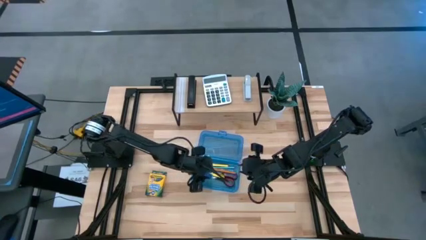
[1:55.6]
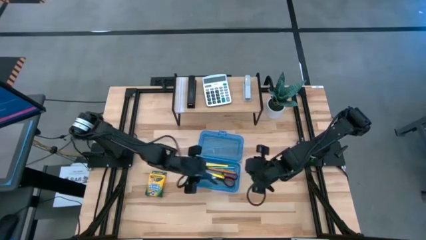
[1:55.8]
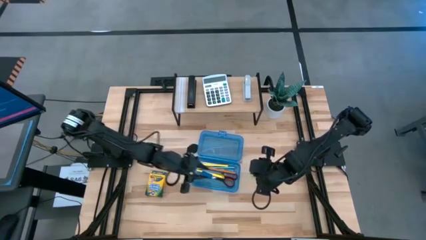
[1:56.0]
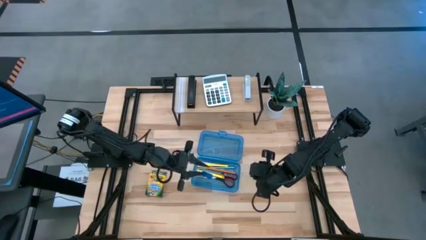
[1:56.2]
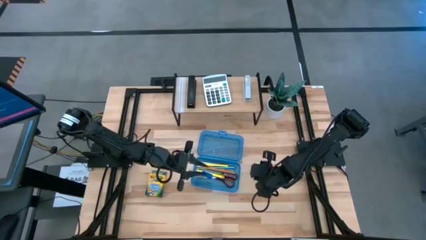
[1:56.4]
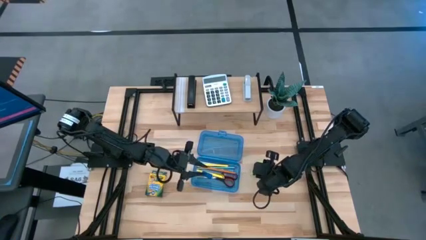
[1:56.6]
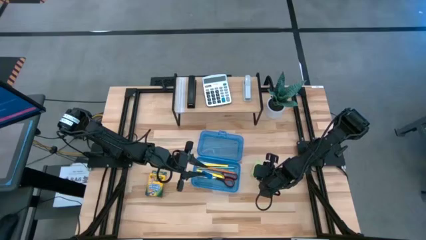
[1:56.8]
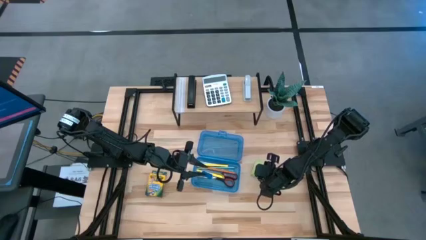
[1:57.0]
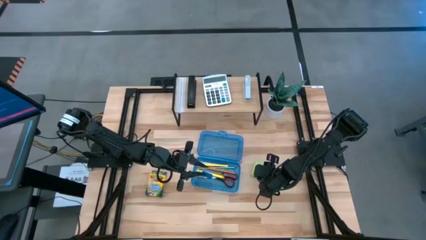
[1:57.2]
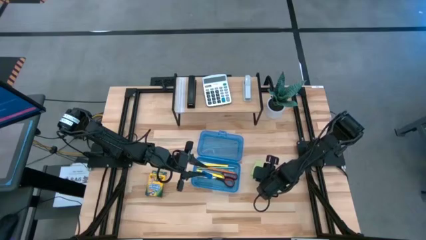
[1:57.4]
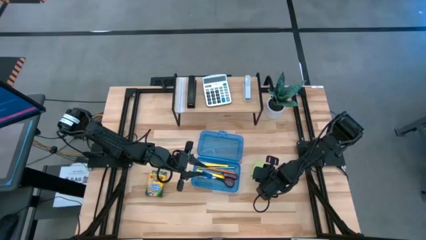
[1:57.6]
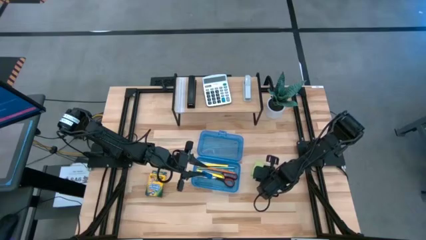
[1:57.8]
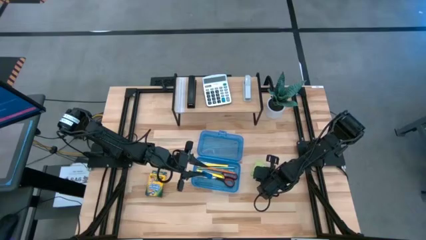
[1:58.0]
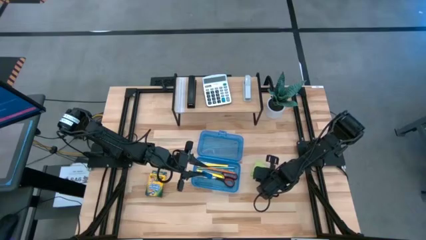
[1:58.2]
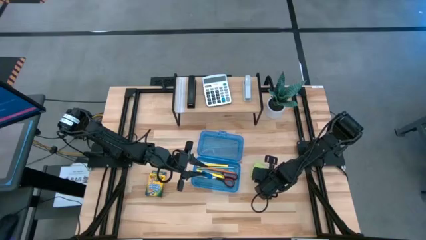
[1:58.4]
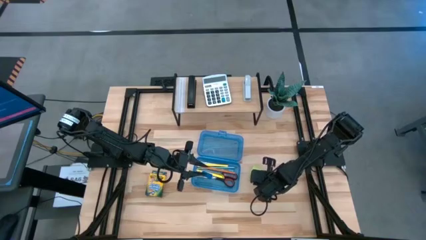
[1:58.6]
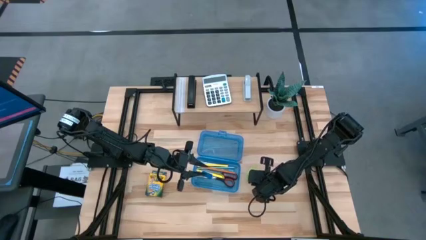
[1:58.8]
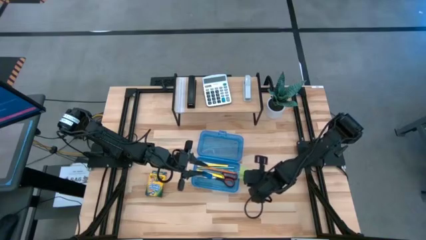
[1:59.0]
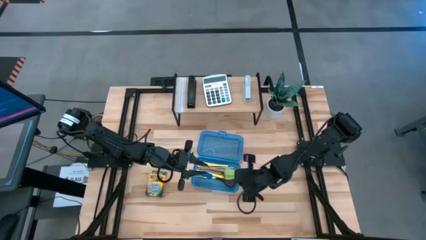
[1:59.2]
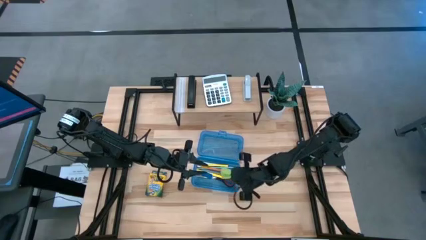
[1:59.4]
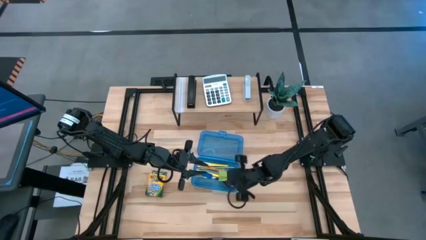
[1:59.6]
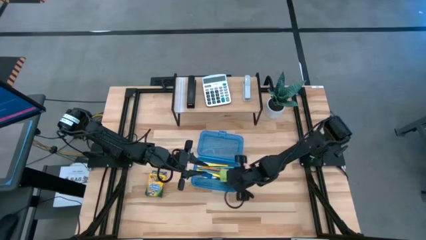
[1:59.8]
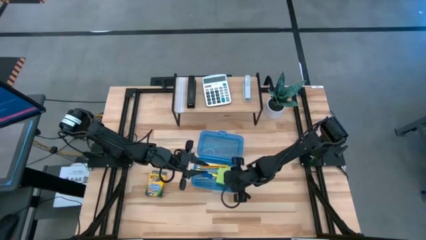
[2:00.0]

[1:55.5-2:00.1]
Task: Pack school essentials
Put the sticky notes into the blue supply box

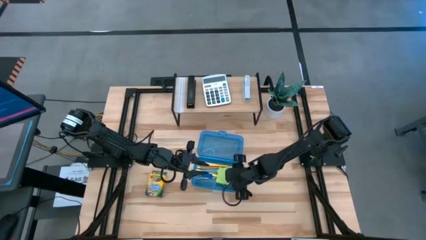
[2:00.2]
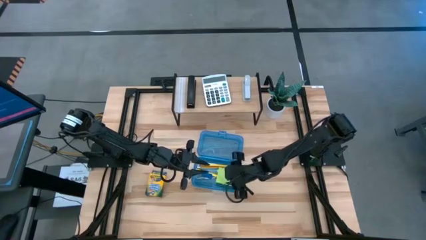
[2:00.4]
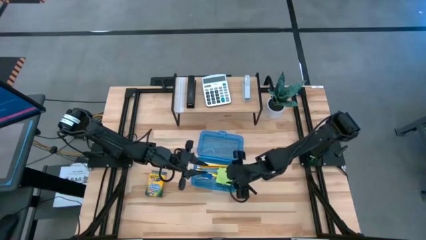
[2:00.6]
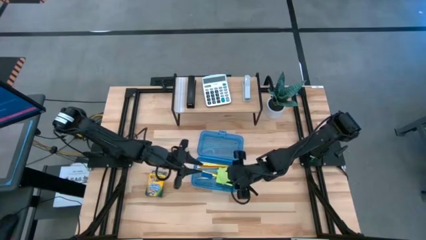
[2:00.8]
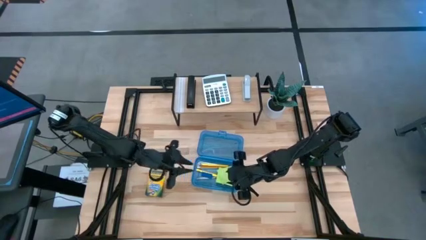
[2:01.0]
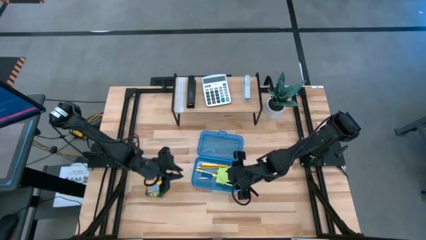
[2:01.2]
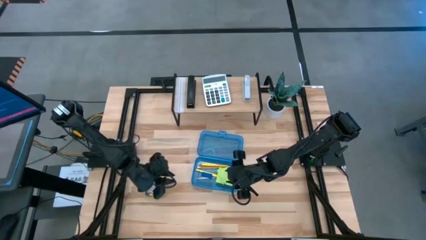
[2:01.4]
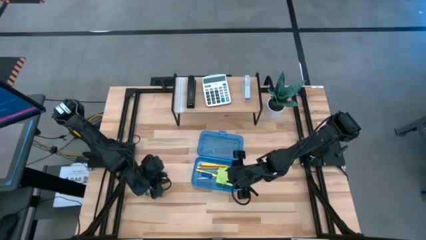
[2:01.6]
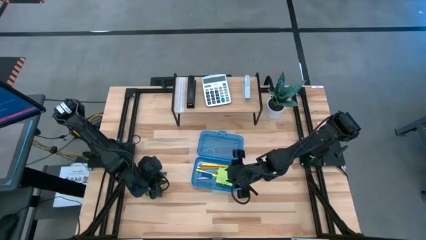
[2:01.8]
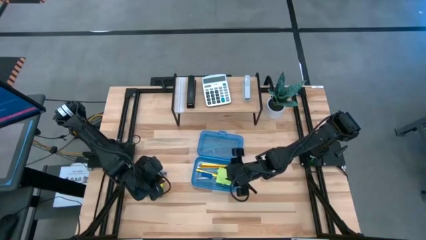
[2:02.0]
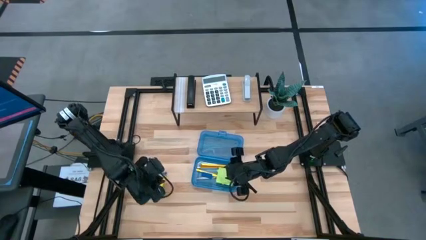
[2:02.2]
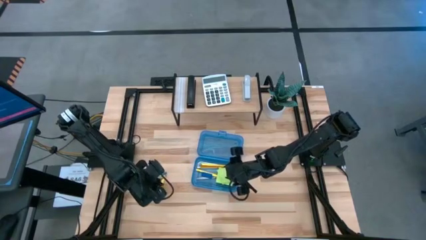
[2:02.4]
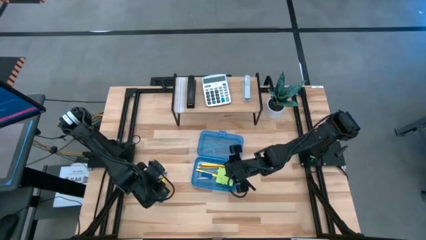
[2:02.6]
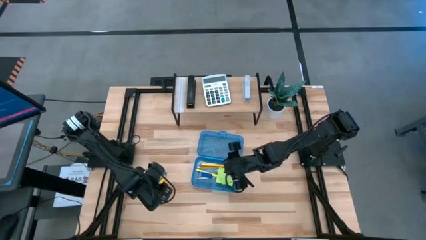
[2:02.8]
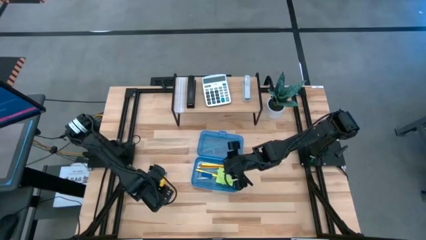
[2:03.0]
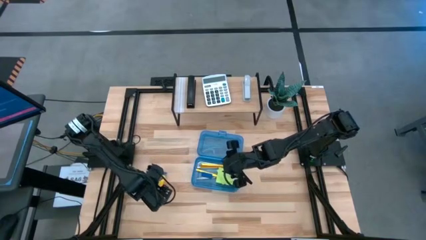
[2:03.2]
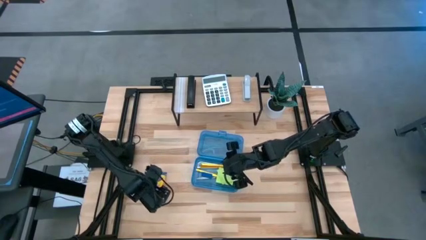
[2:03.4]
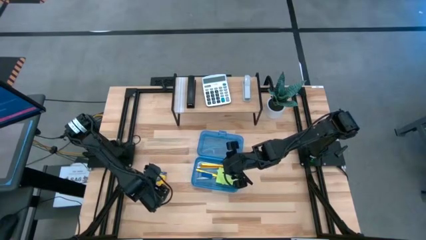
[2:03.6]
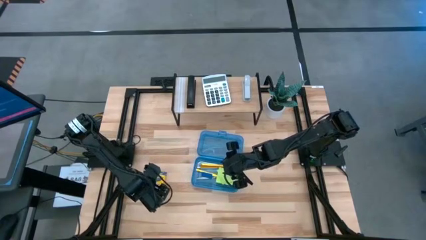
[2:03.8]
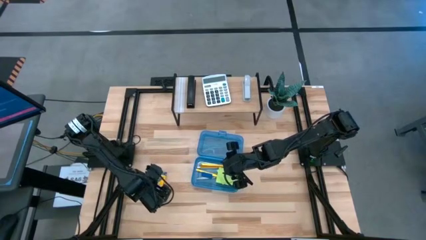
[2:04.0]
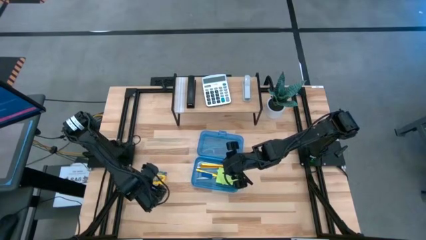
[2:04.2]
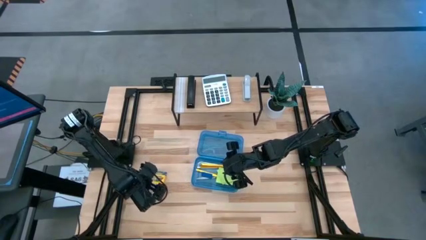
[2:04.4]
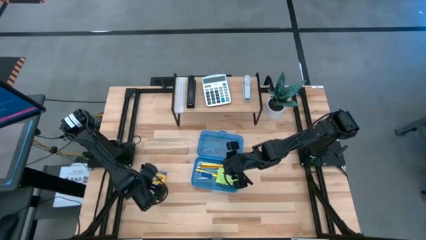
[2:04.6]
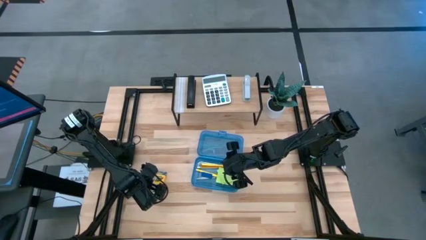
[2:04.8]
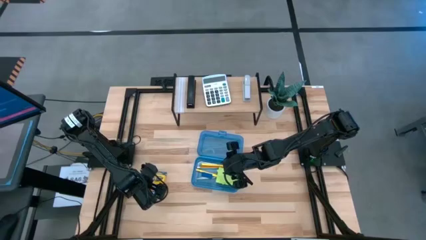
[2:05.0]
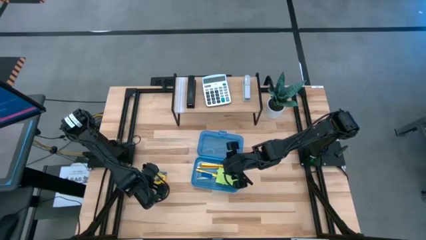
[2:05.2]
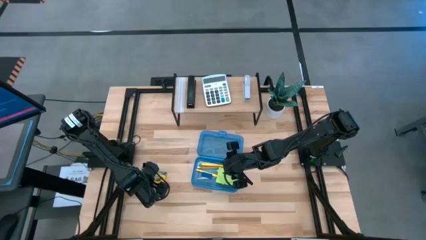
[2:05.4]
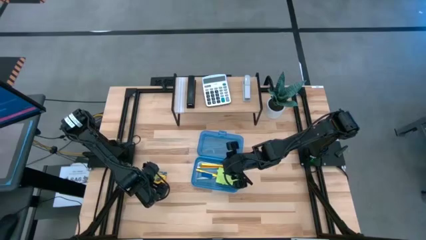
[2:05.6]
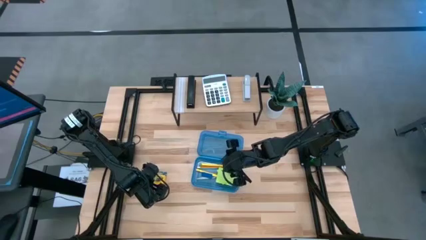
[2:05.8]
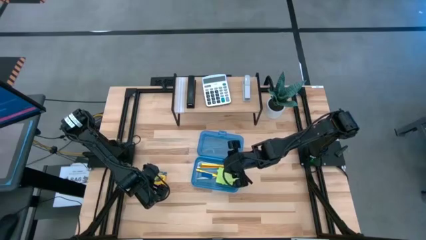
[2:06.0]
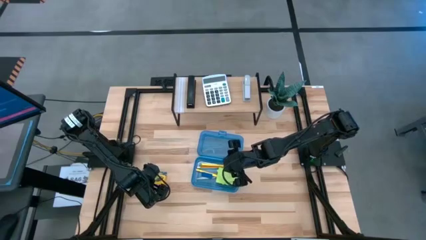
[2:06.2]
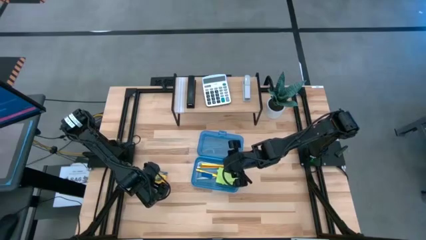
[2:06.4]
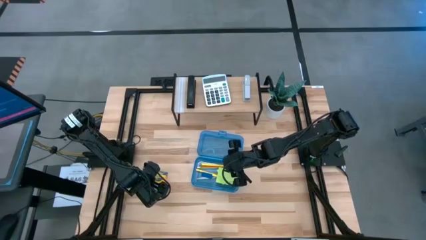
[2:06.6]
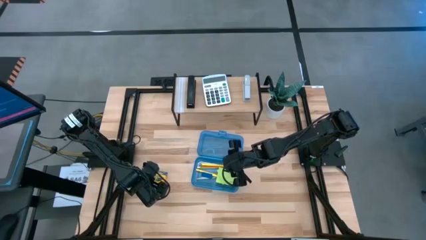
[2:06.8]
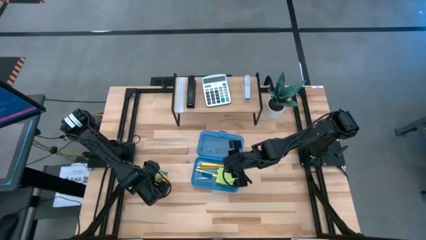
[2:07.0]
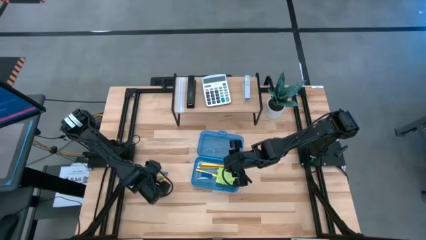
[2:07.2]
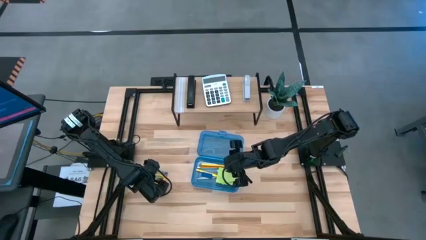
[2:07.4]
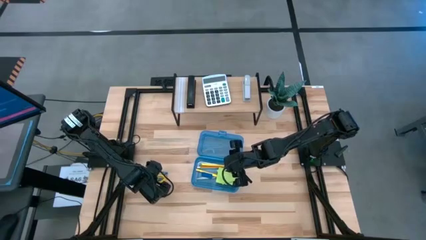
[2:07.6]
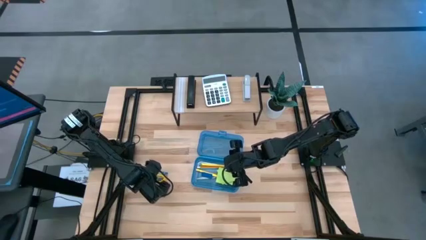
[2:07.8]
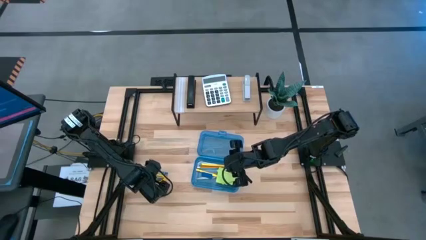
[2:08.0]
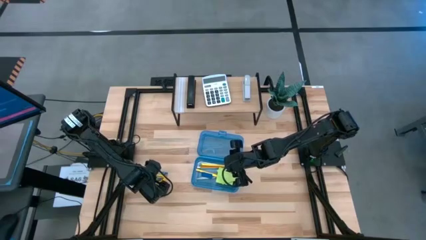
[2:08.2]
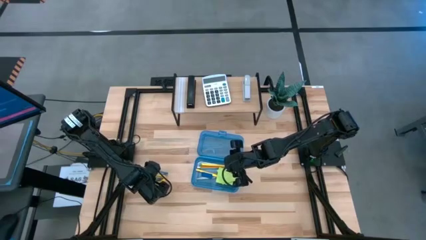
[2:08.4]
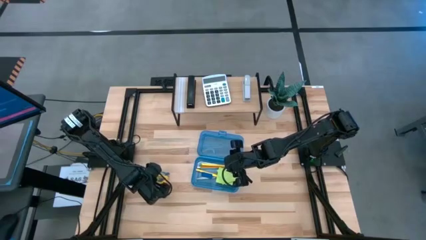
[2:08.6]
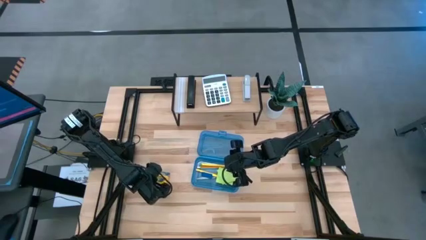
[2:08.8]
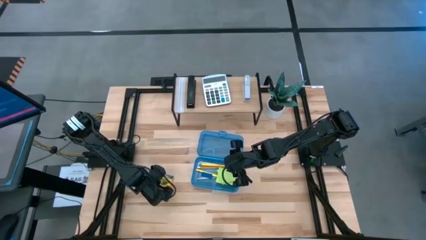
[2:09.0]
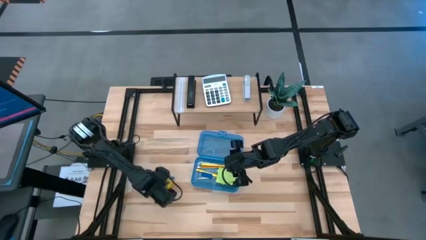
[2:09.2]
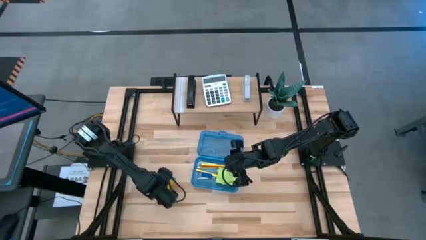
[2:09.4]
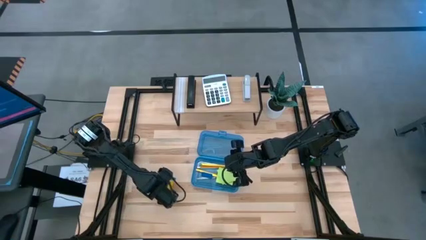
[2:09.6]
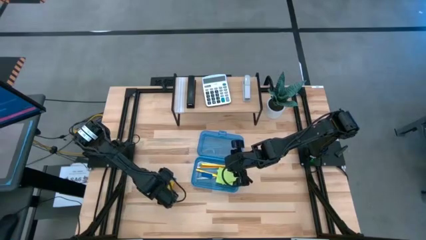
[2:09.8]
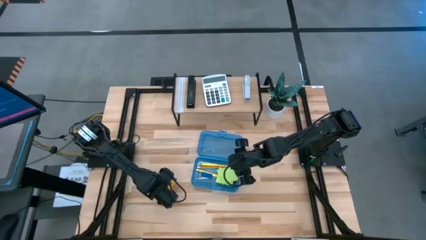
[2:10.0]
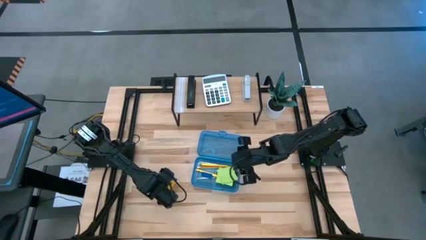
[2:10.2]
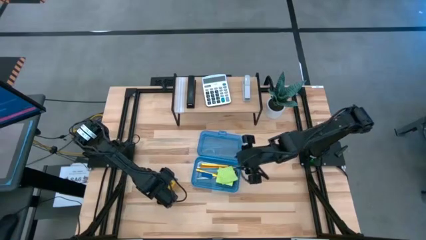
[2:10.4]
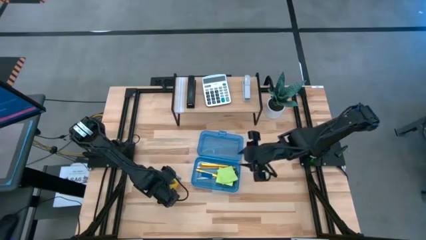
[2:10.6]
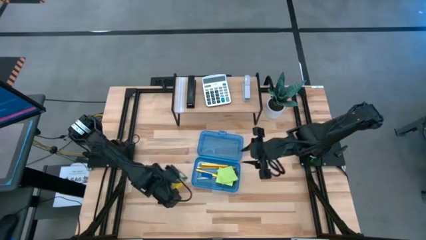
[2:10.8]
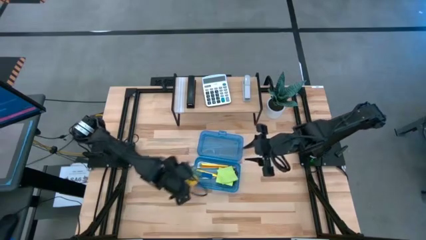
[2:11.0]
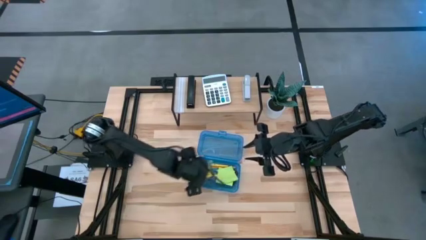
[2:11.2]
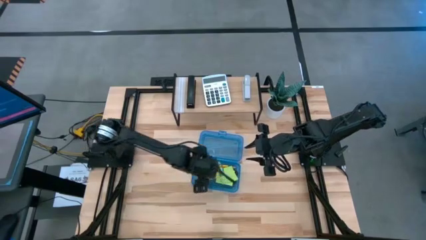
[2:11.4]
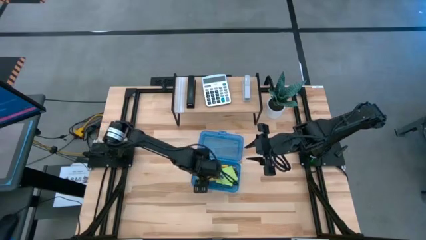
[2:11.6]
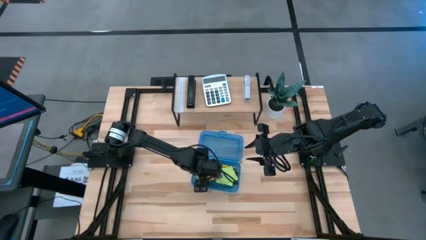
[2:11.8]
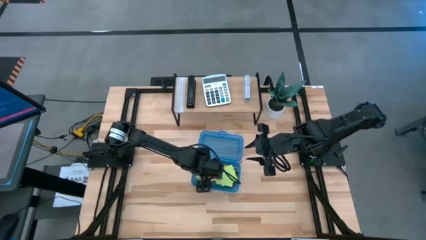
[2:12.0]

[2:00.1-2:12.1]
Put the crayon box into the blue supply box
